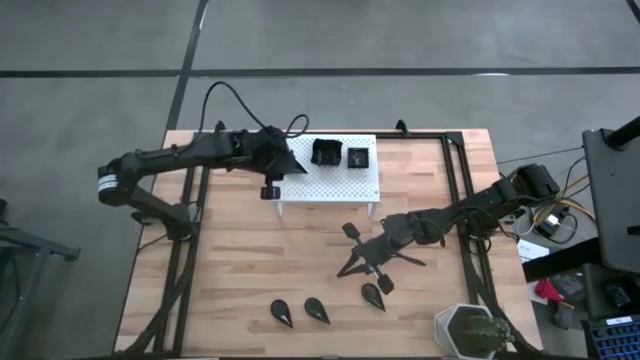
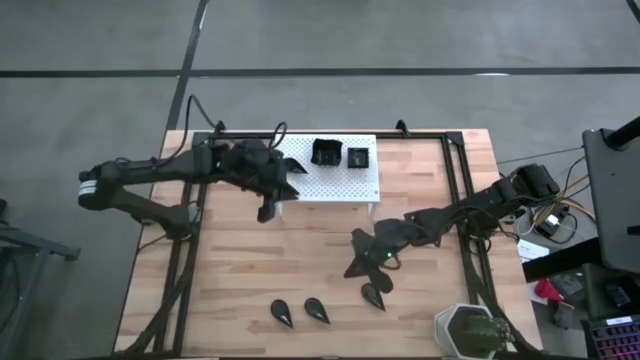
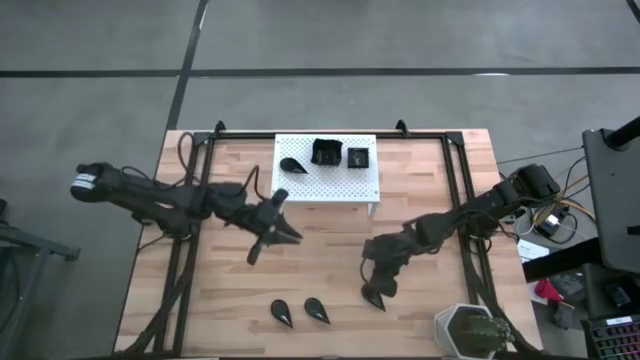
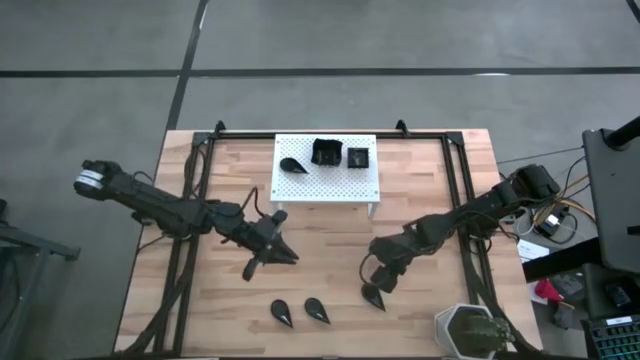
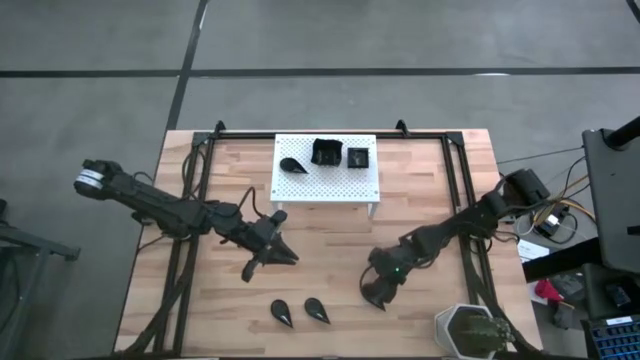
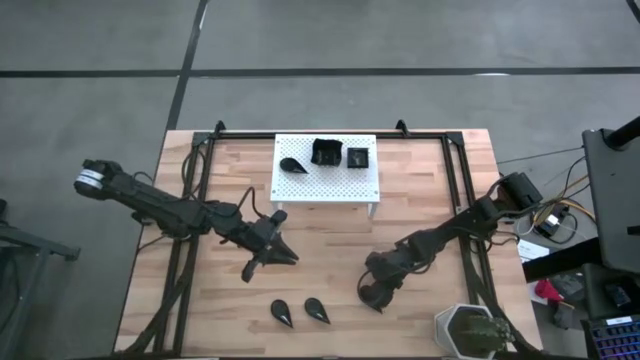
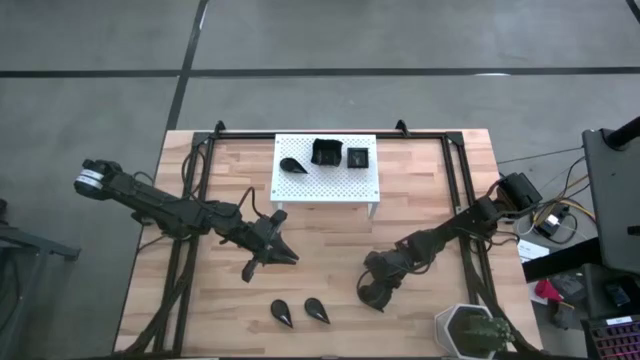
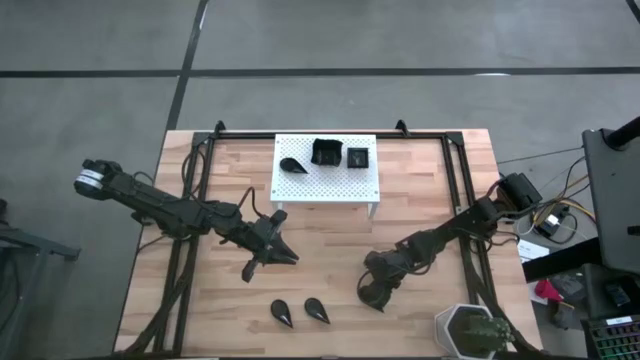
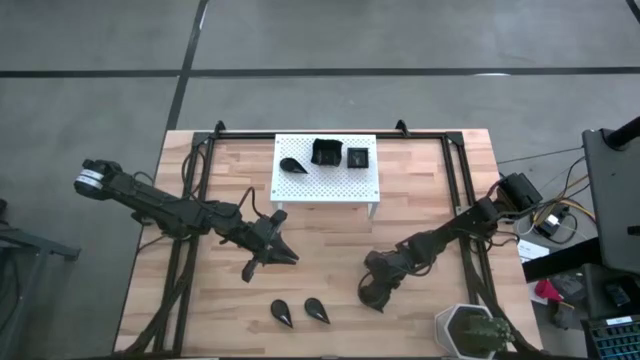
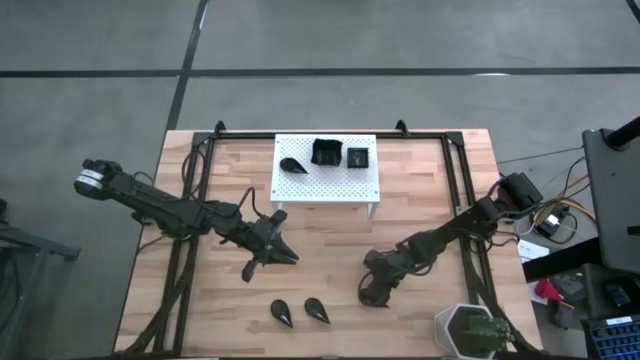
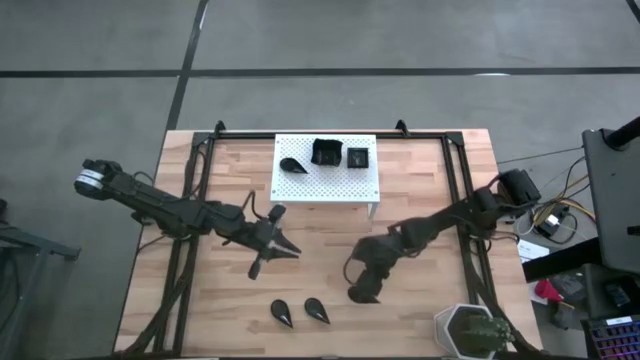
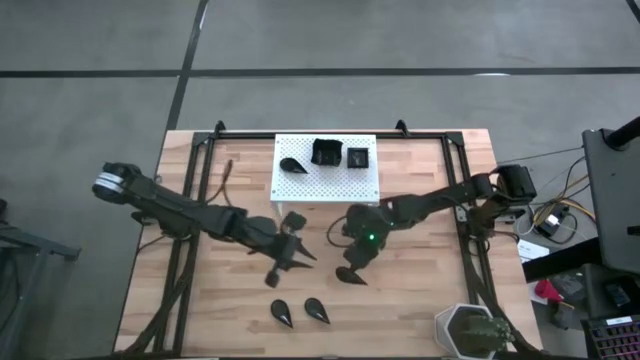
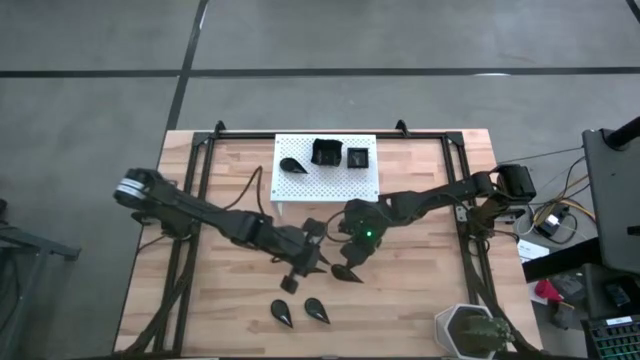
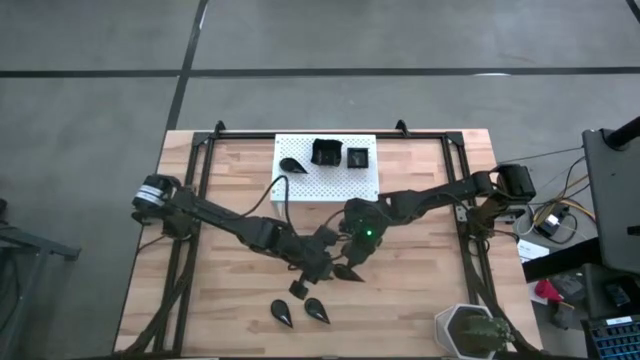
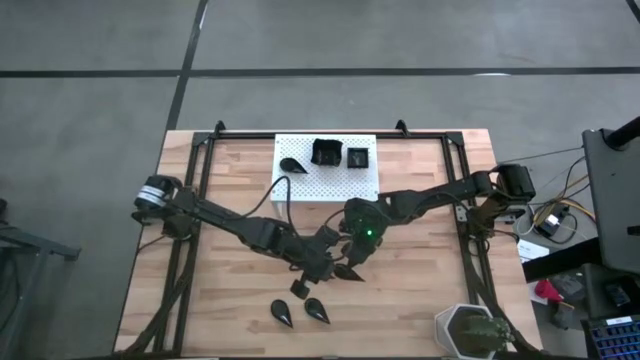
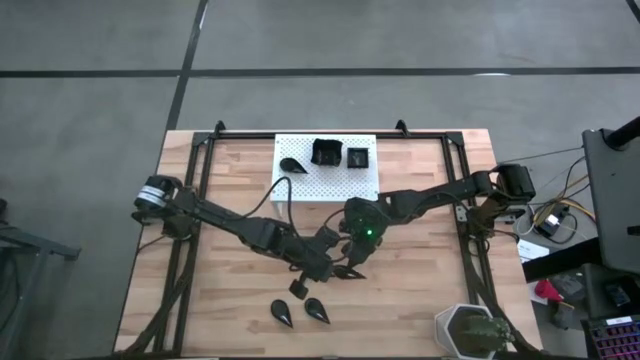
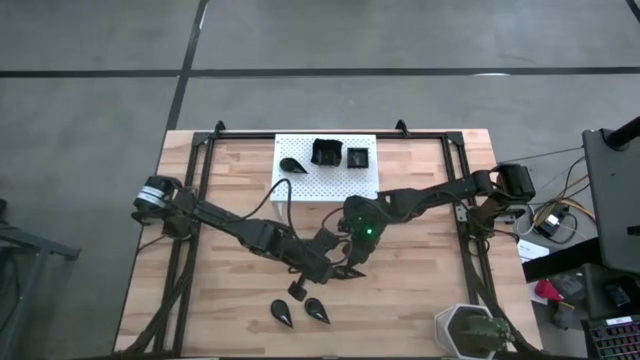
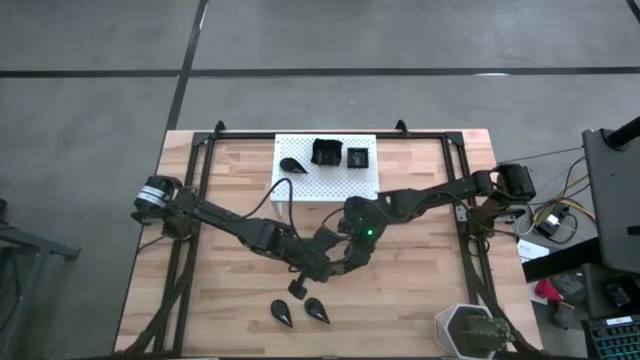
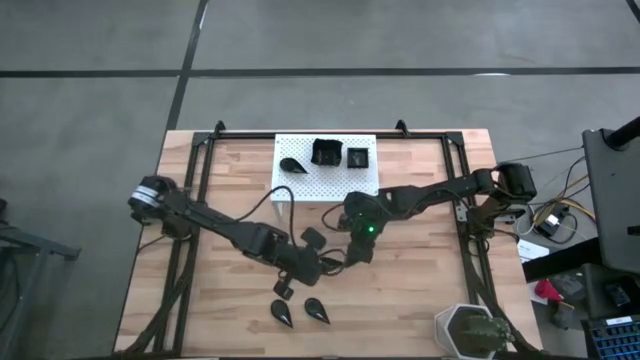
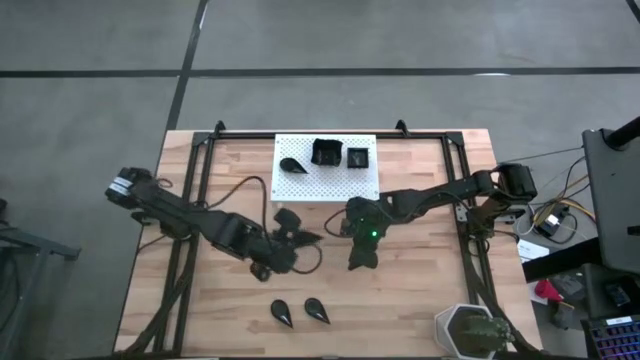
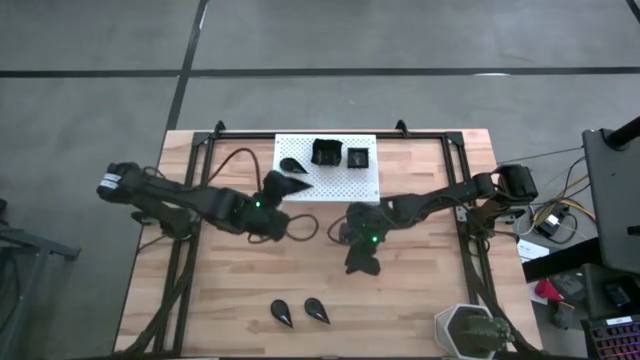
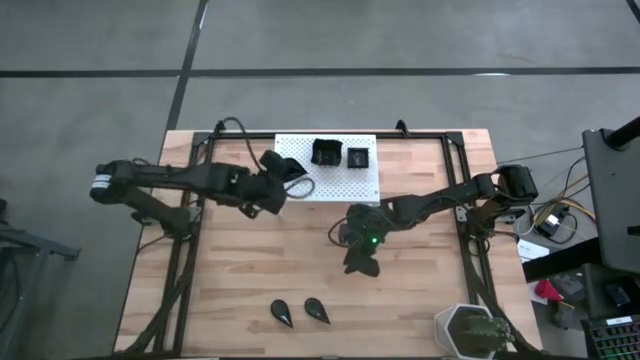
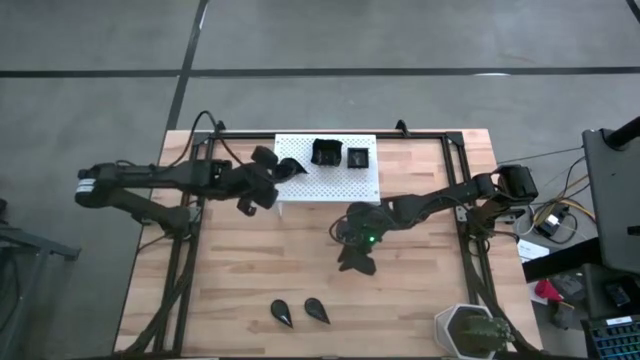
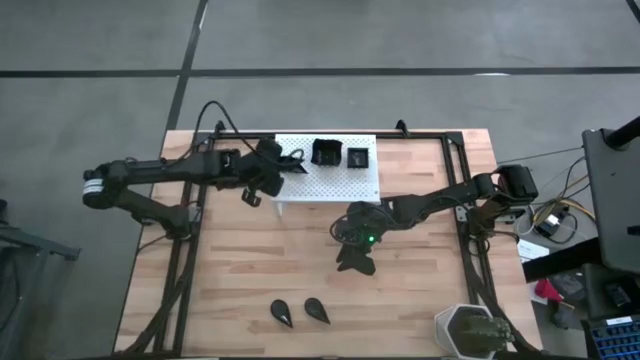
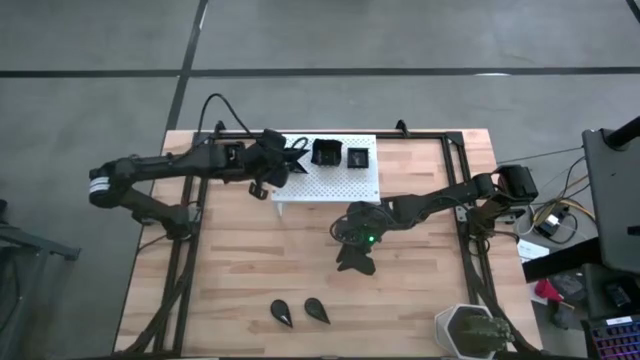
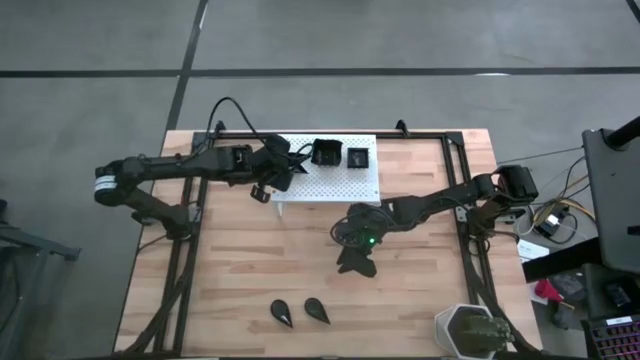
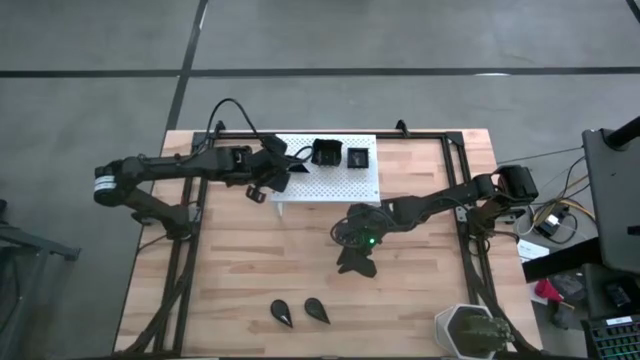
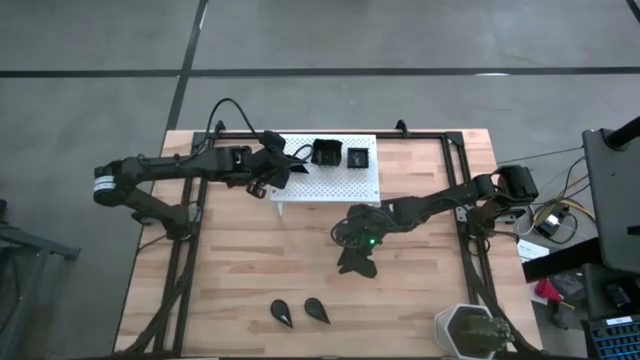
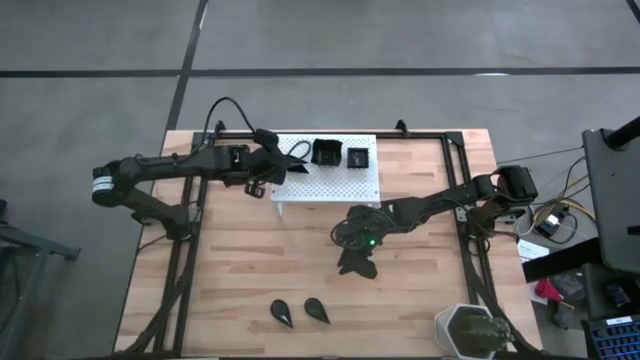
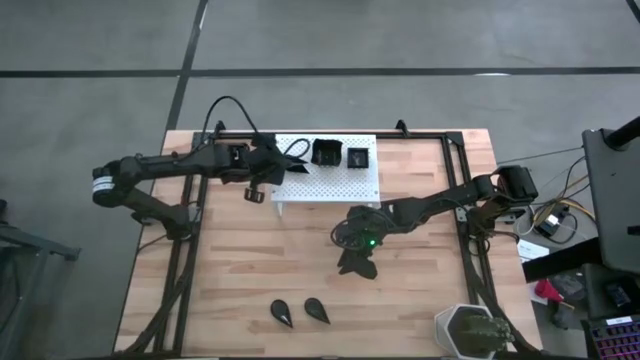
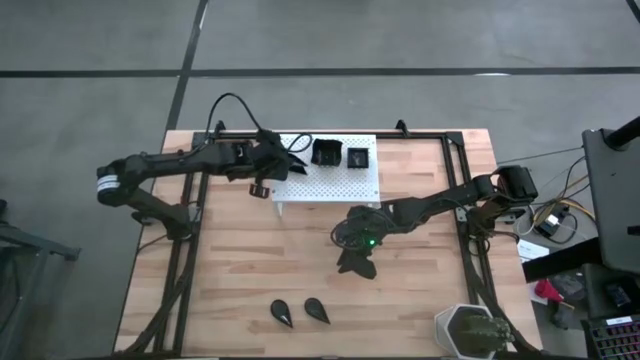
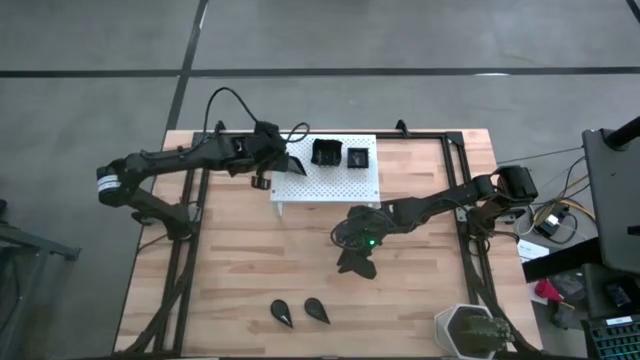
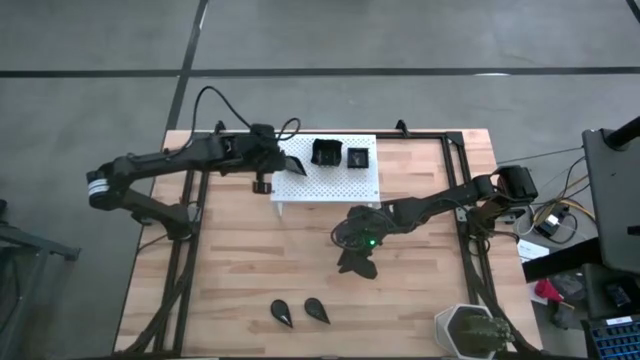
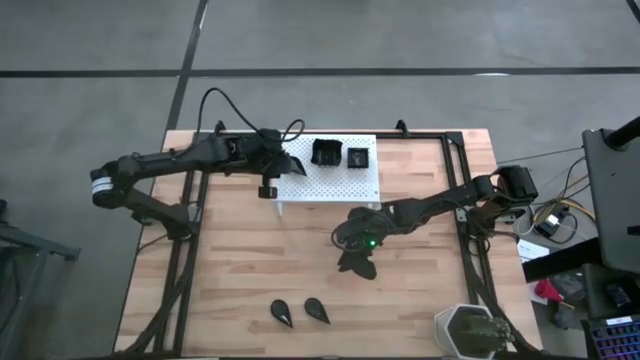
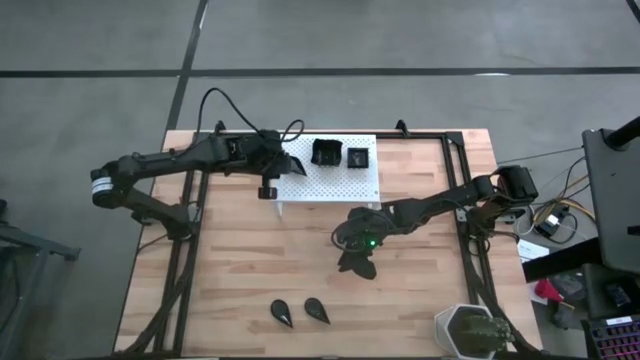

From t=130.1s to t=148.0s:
Task: Pick & Place Mini shaped plates
Stack the drop shaped plate on top of the drop shaped plate on the shelf

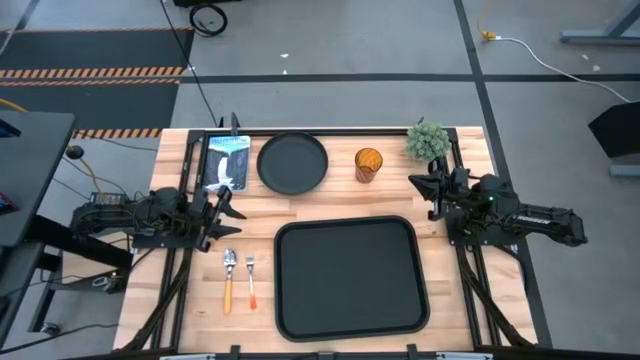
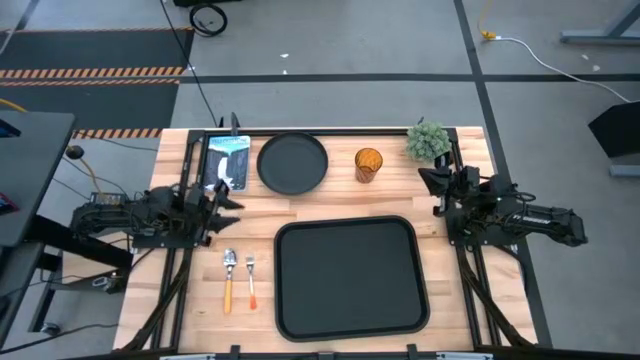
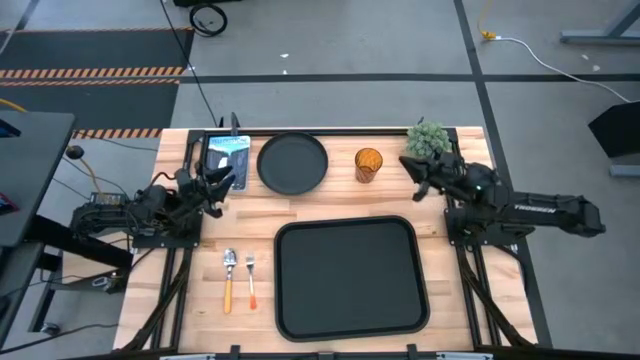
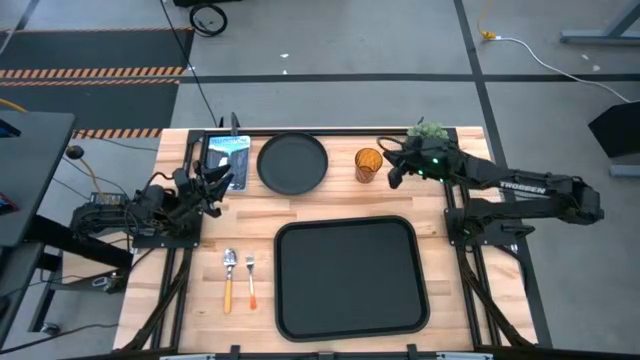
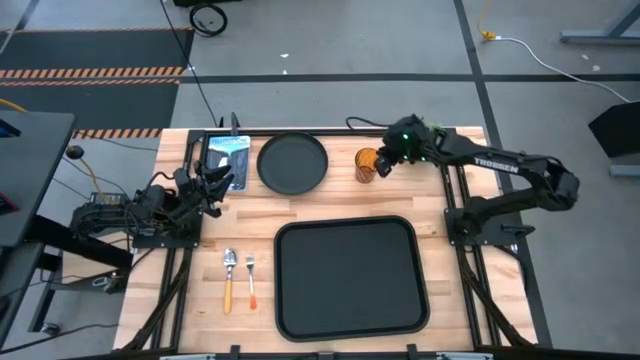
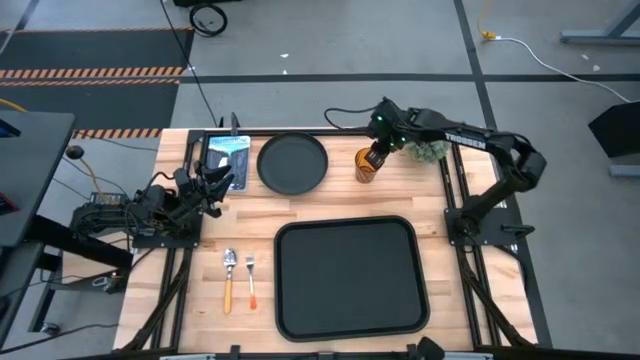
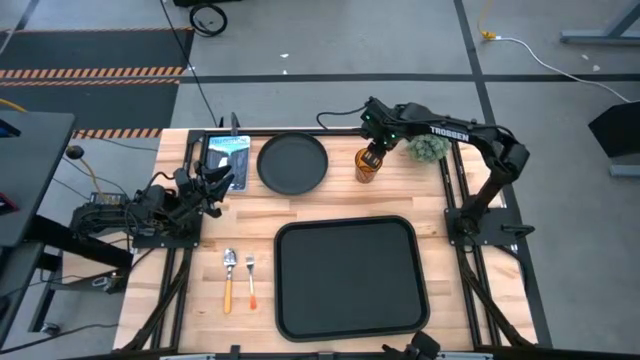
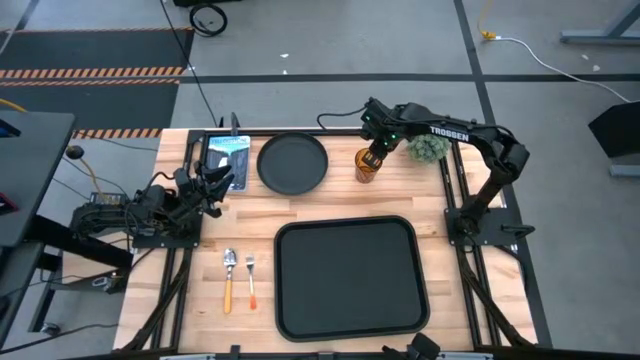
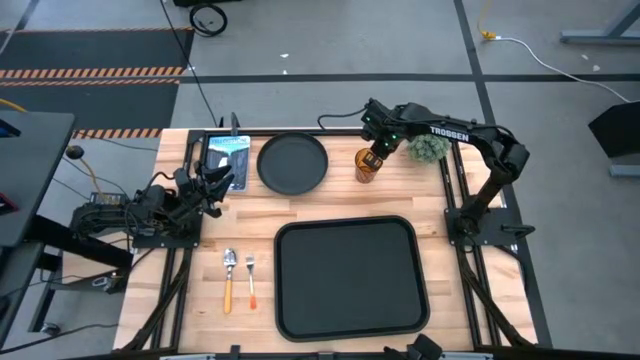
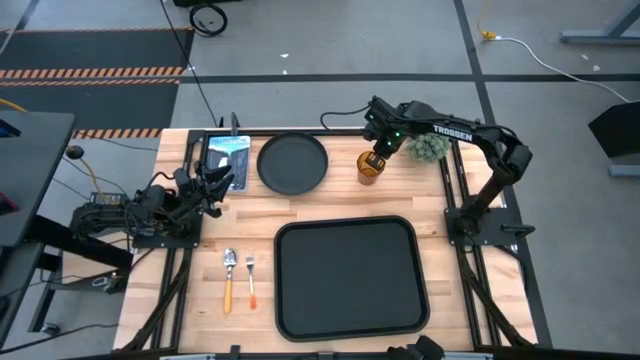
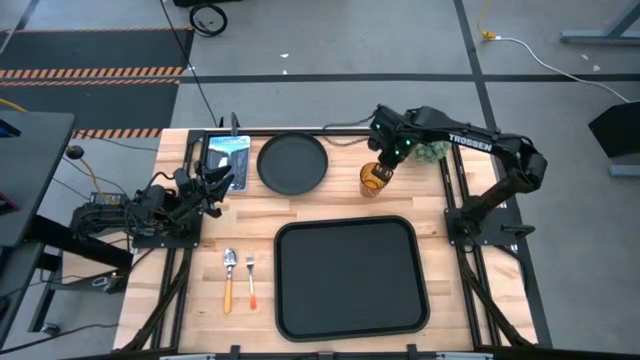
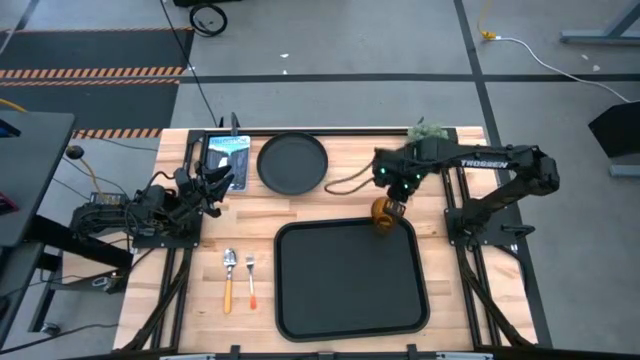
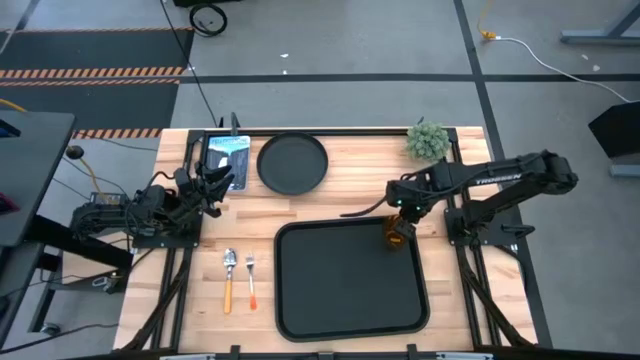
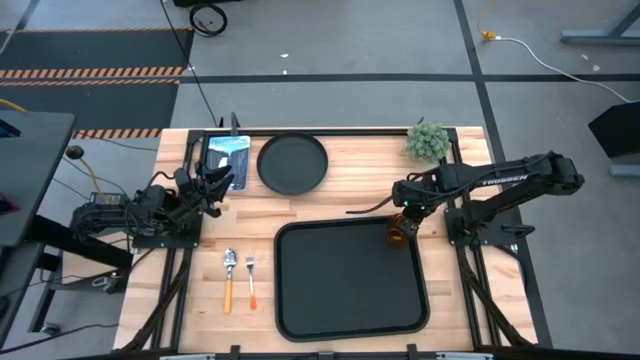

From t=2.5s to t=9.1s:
Task: Pick and place plate/cup/fork/spoon on tray
Put the brown glass on the top right on the black serving tray
